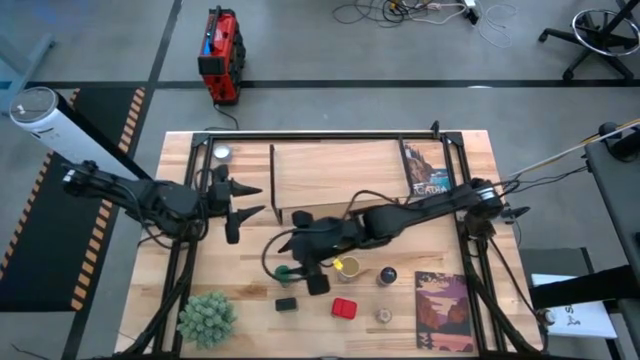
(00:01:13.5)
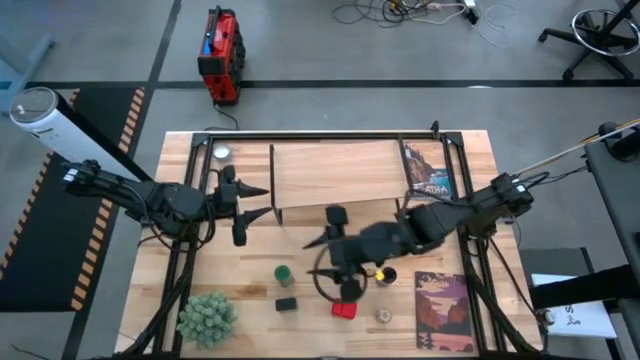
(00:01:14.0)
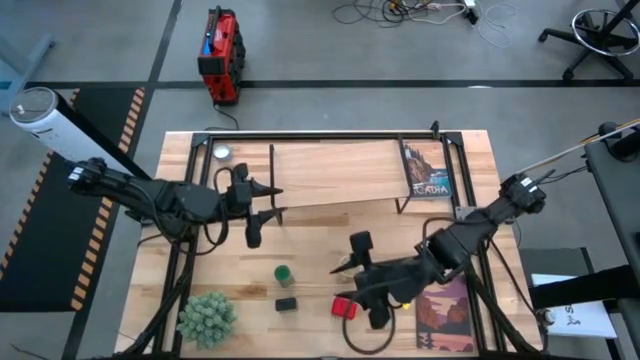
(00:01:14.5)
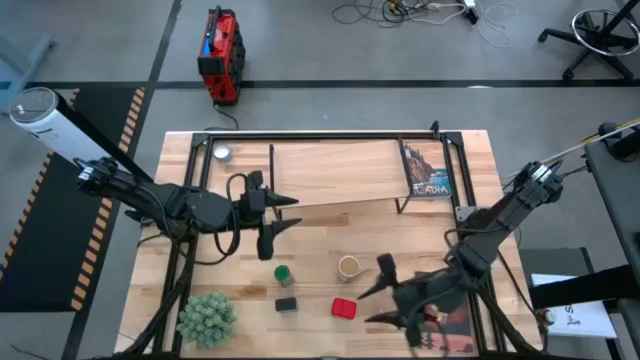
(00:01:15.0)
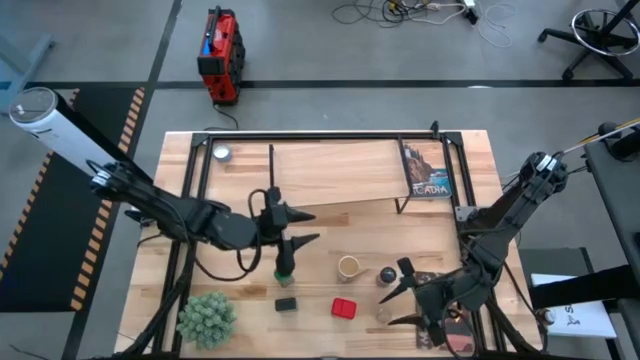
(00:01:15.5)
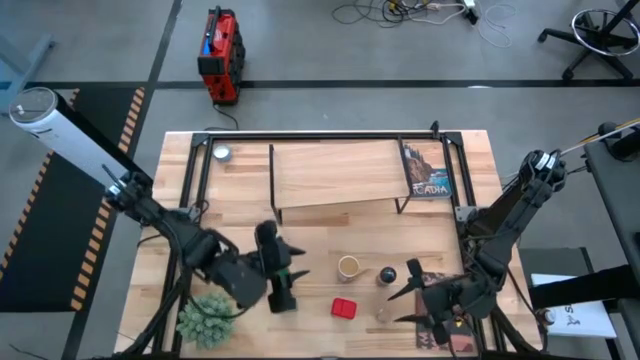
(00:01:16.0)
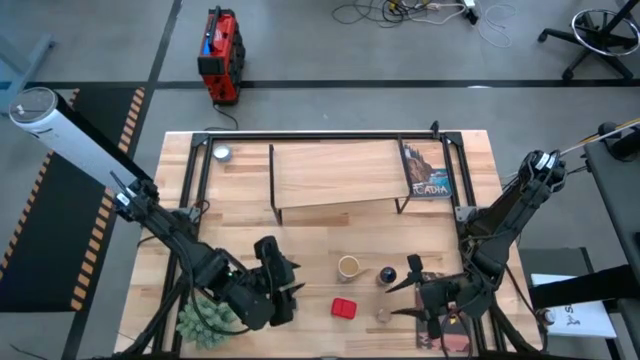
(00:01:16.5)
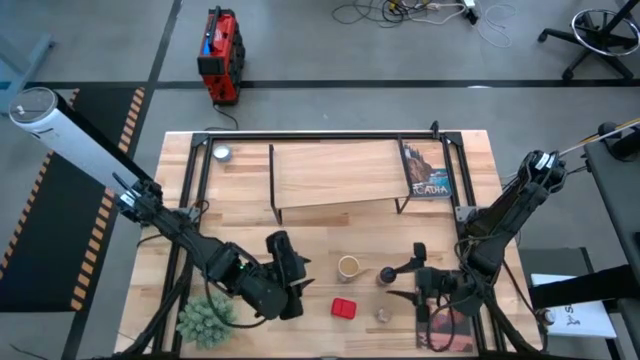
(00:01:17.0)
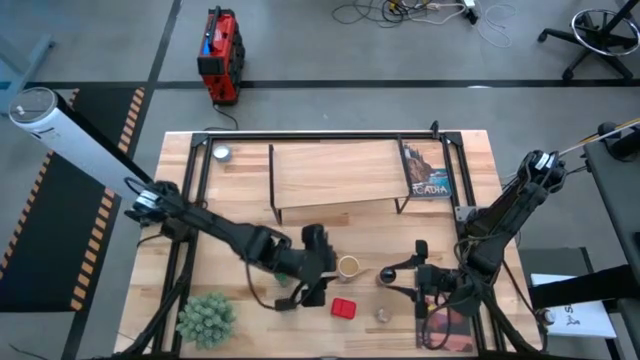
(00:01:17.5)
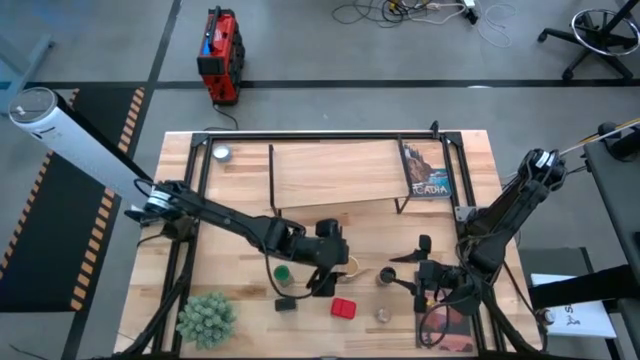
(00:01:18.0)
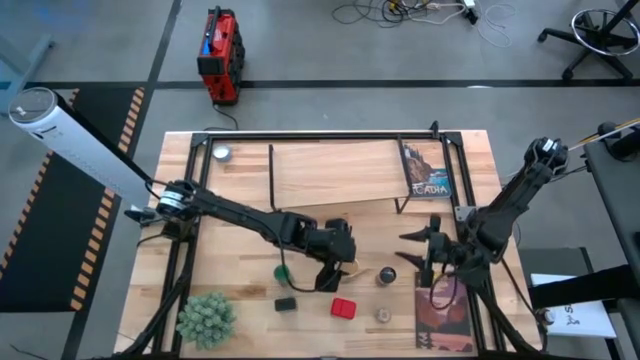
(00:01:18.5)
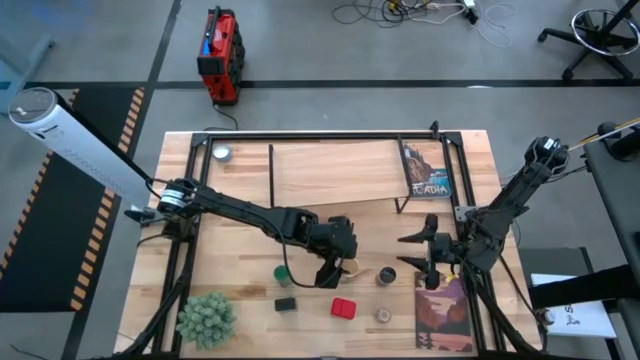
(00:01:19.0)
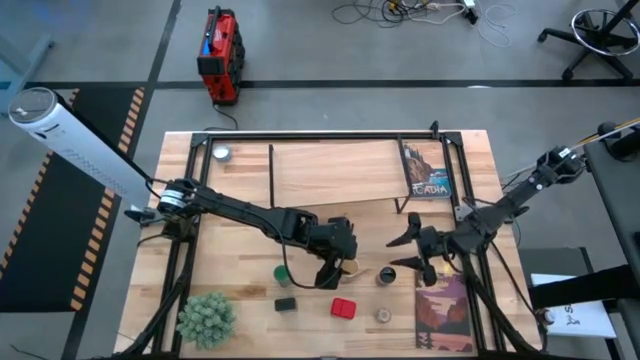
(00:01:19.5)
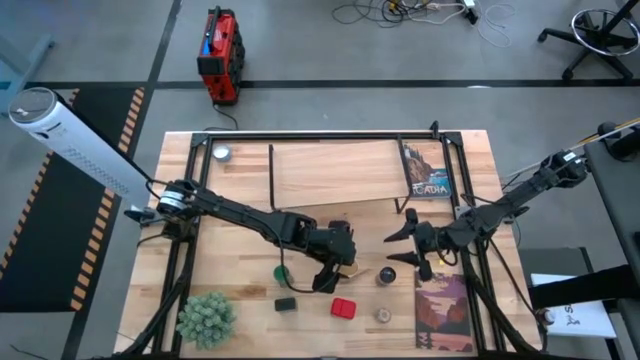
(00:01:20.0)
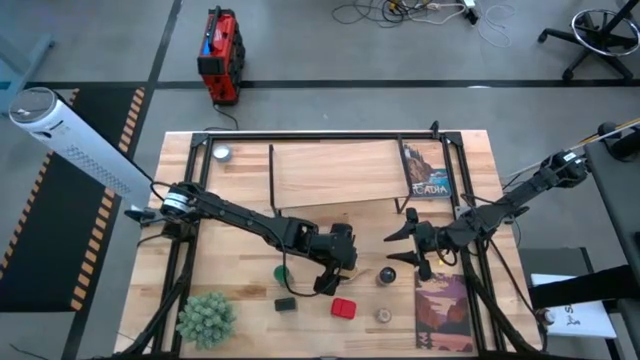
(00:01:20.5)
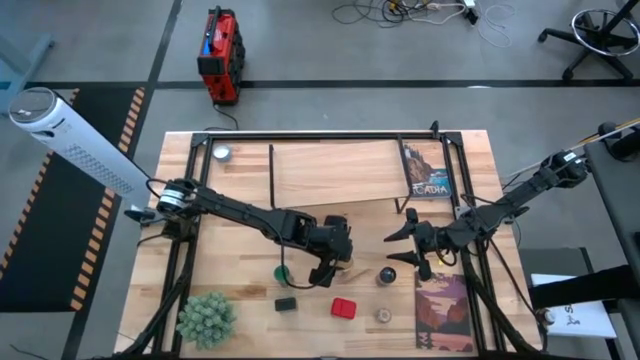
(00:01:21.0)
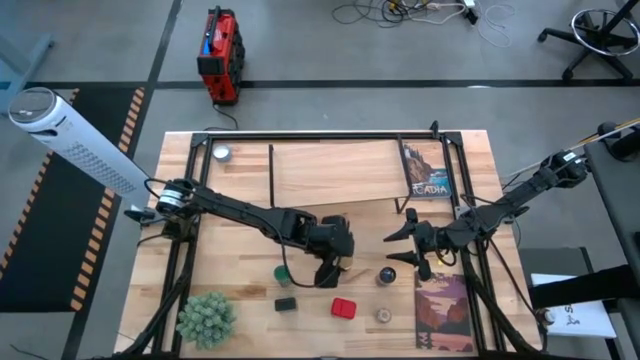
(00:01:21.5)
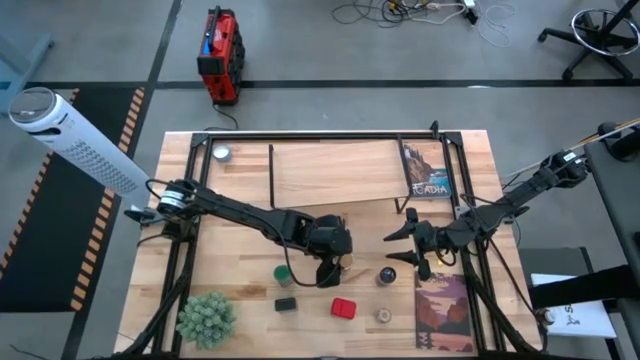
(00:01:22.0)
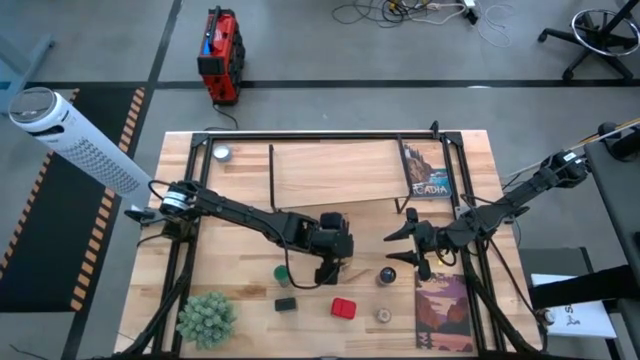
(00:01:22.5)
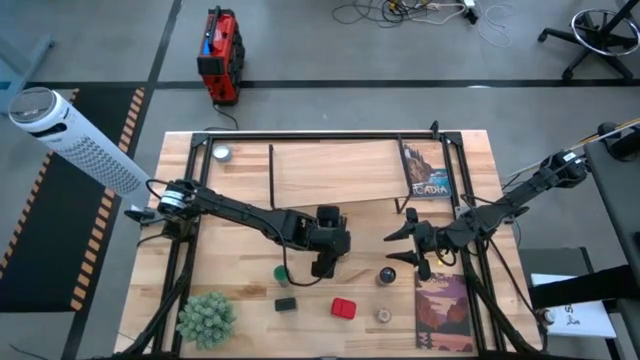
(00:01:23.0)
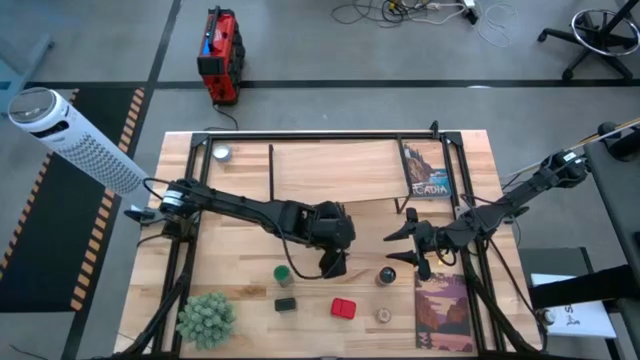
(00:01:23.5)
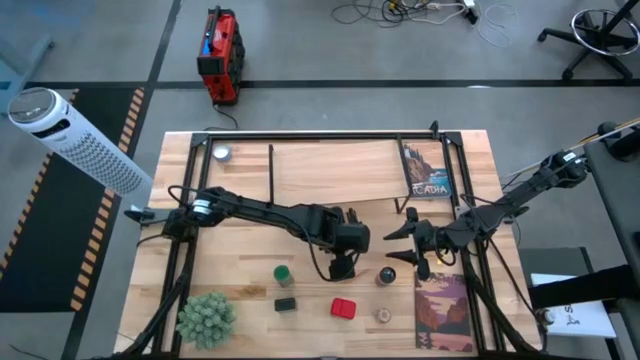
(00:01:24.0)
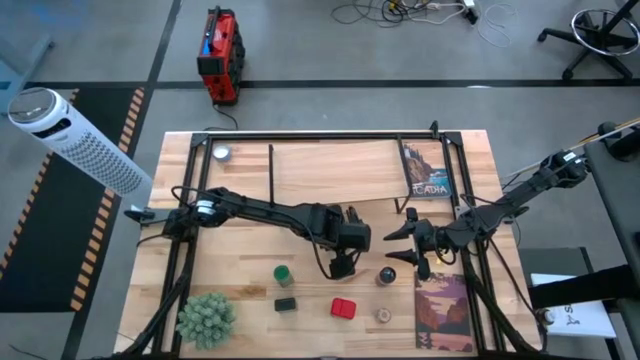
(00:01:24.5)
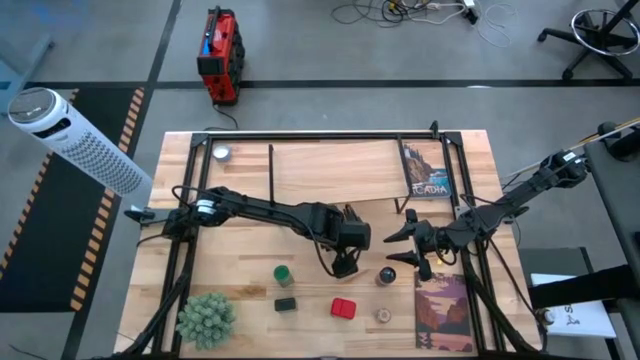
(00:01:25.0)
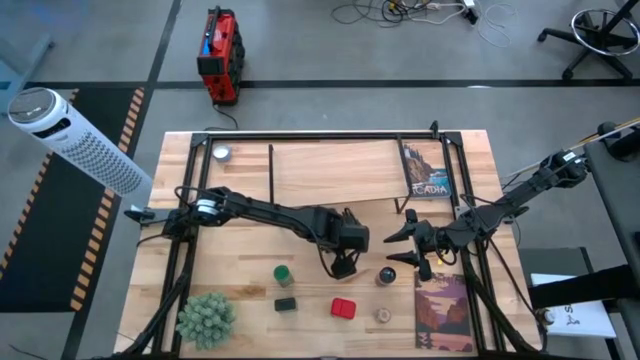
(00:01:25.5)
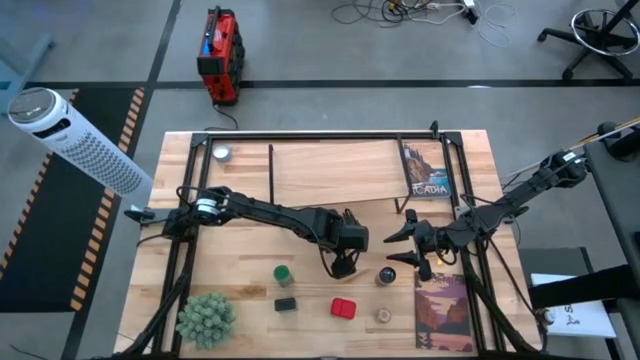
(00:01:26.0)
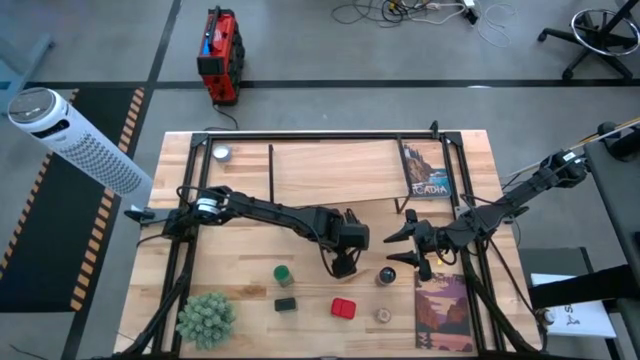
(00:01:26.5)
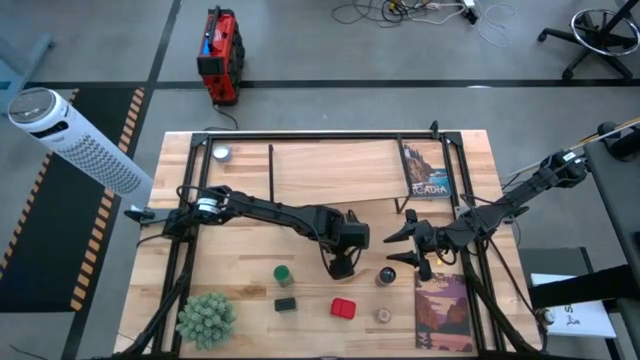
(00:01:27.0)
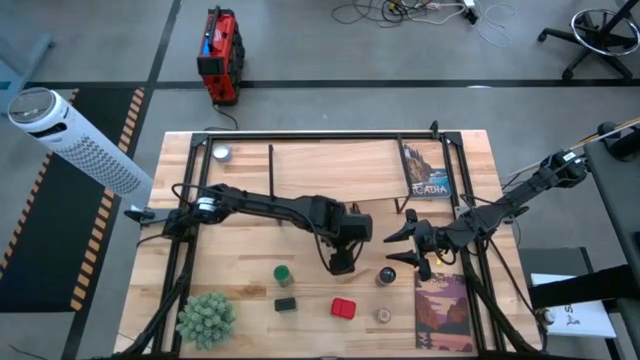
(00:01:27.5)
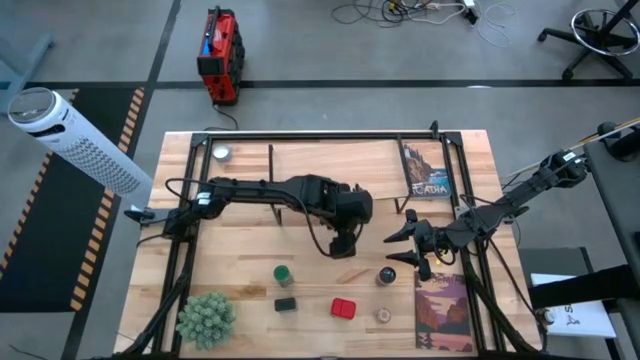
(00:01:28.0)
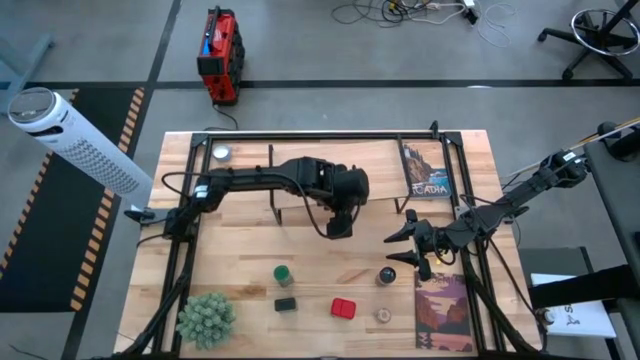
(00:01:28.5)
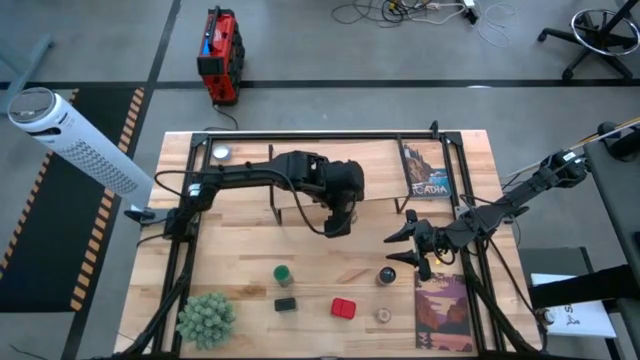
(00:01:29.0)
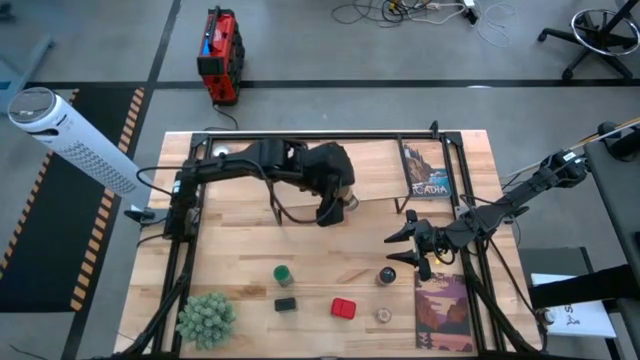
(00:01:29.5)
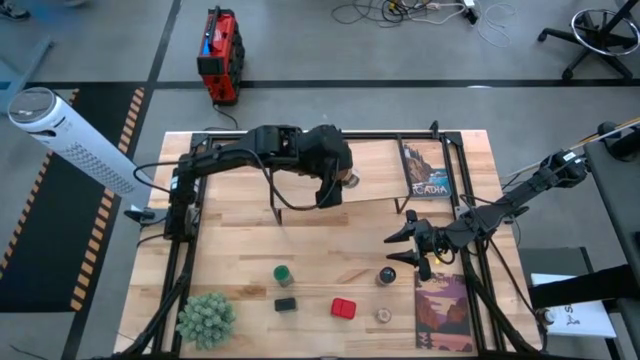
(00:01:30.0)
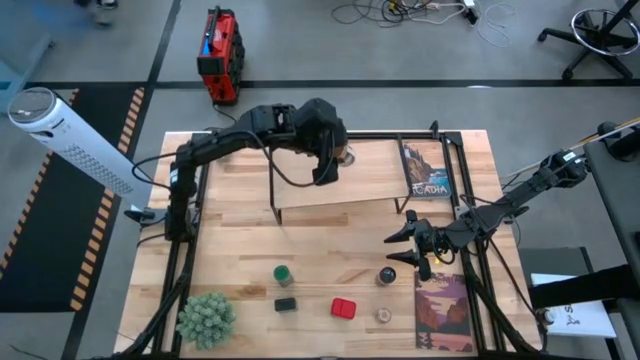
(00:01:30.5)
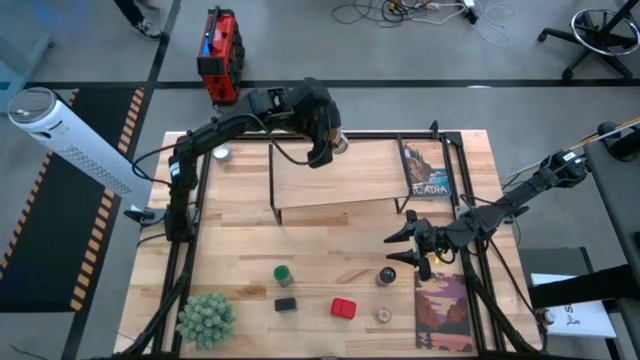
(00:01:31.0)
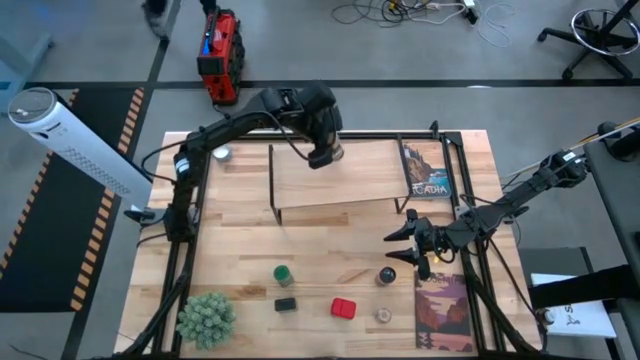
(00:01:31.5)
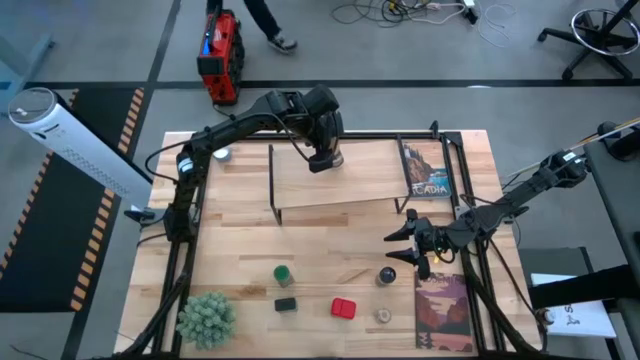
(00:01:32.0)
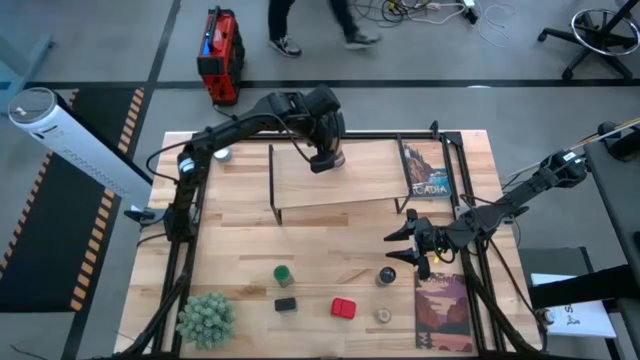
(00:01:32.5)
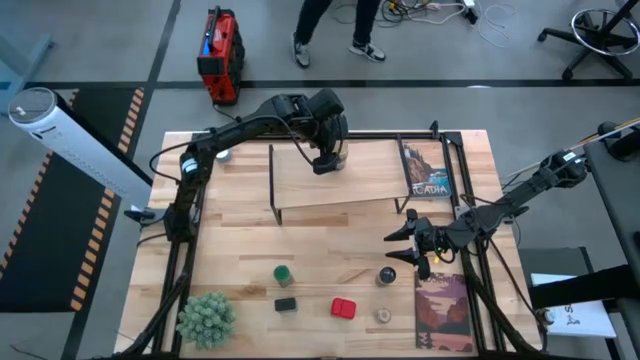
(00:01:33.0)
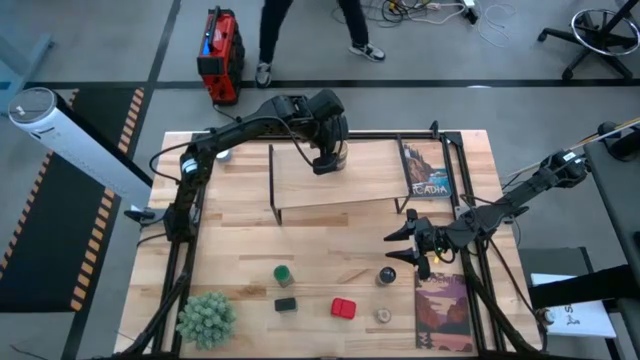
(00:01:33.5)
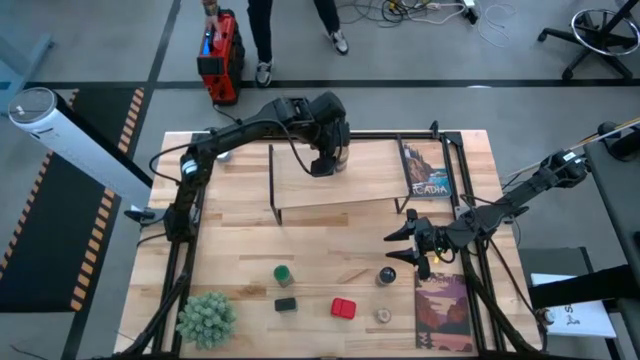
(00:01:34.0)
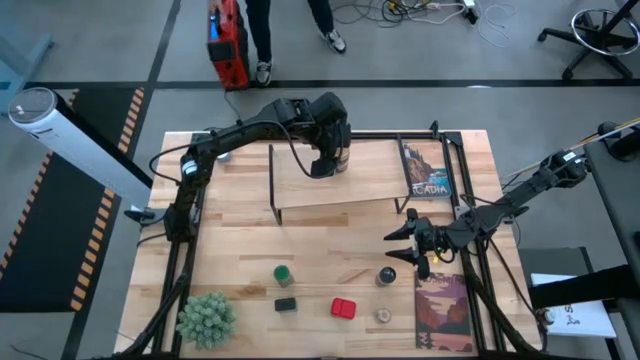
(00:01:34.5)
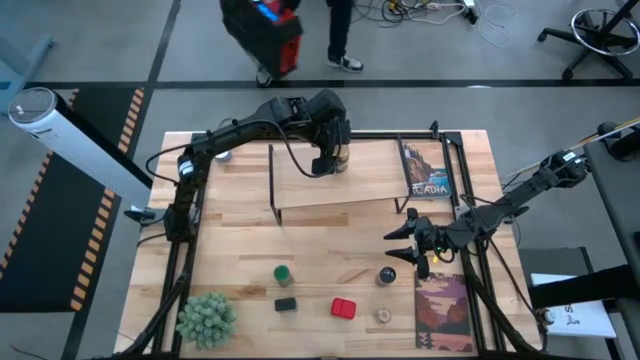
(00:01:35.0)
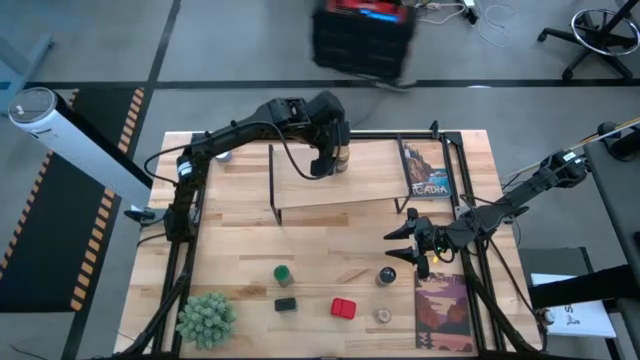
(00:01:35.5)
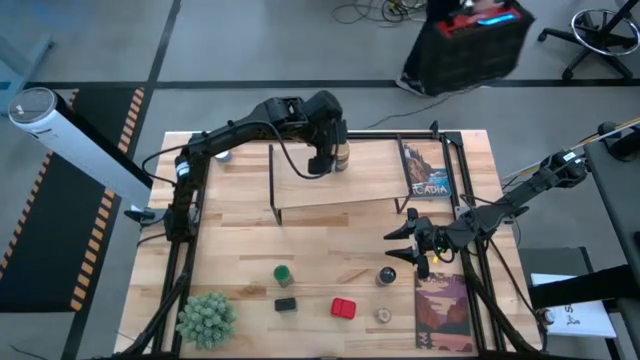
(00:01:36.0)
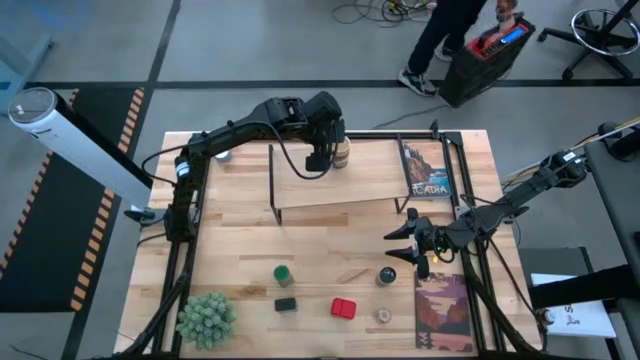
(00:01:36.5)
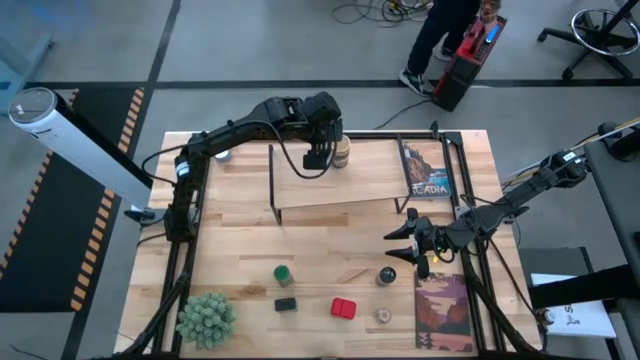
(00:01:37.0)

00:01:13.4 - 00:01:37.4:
Task: Shelf spices
Put the gold seasoning bottle on the shelf
